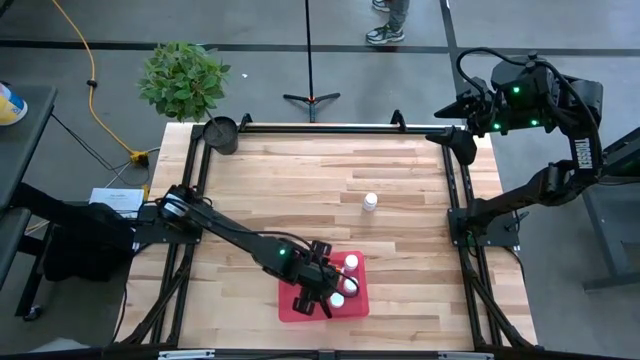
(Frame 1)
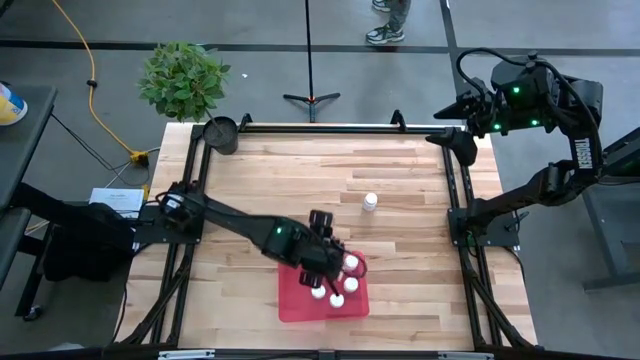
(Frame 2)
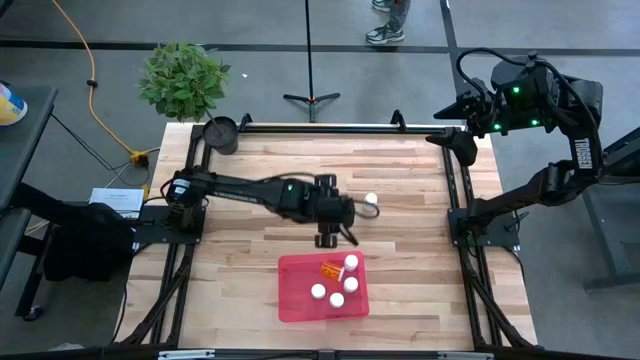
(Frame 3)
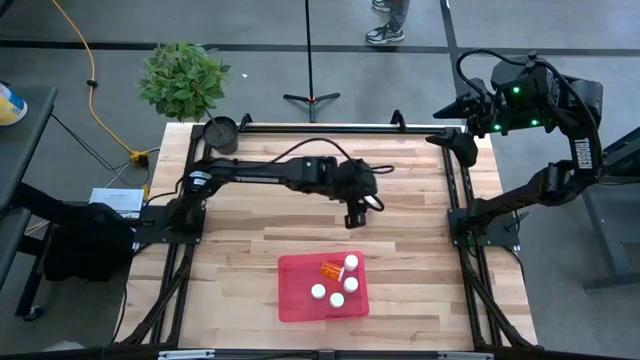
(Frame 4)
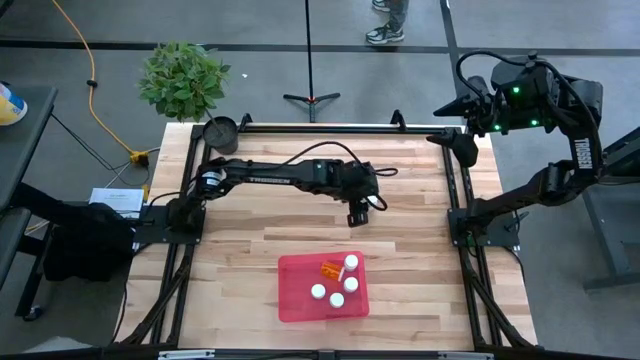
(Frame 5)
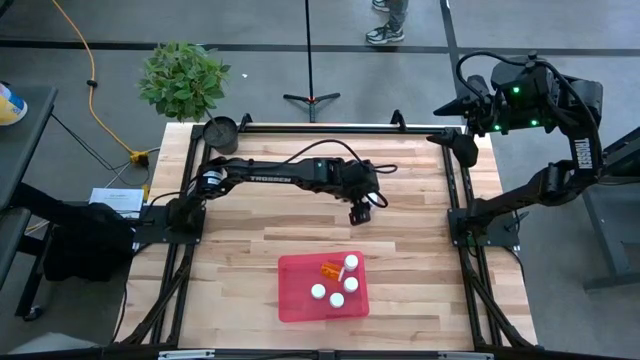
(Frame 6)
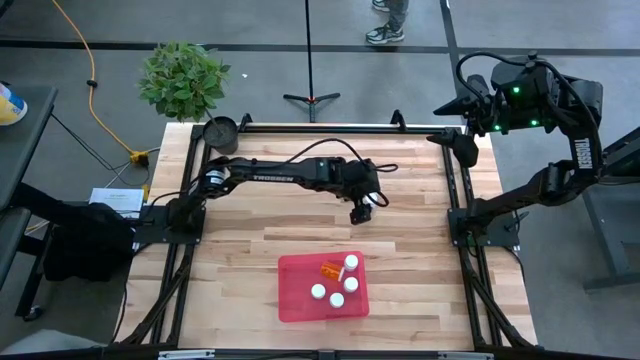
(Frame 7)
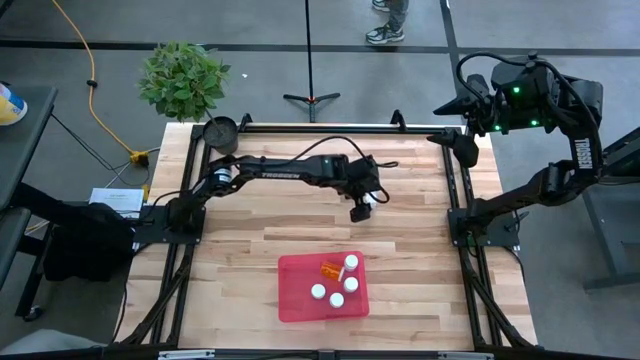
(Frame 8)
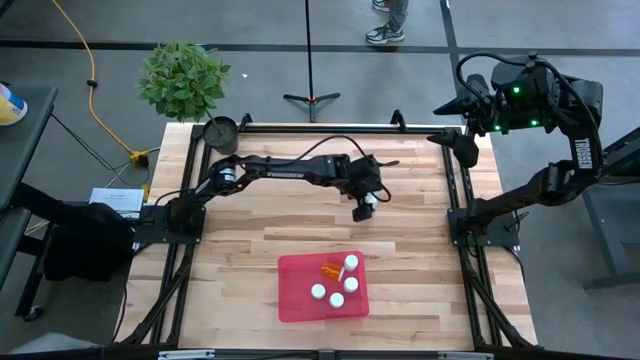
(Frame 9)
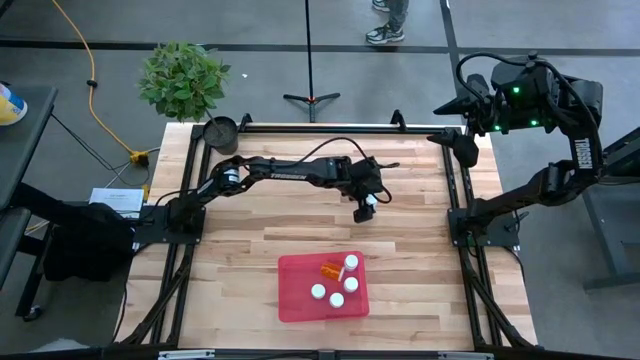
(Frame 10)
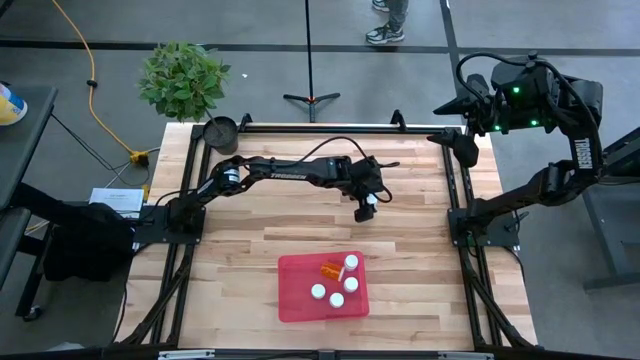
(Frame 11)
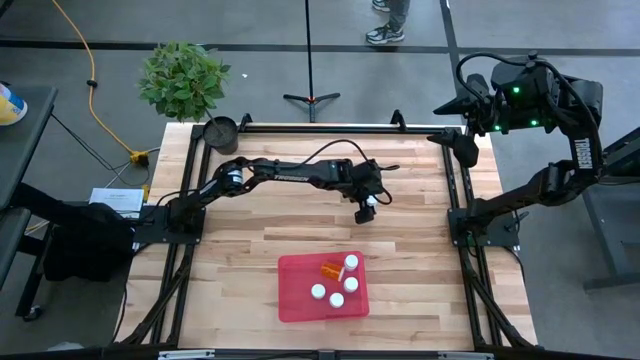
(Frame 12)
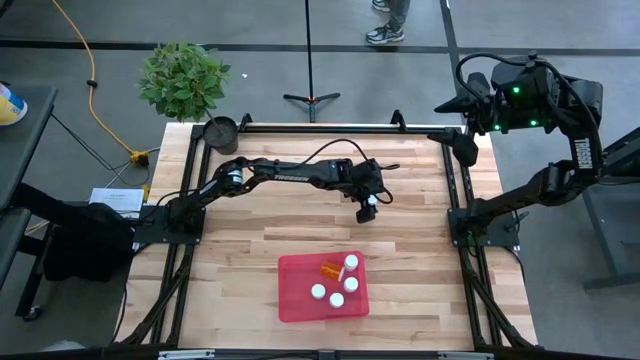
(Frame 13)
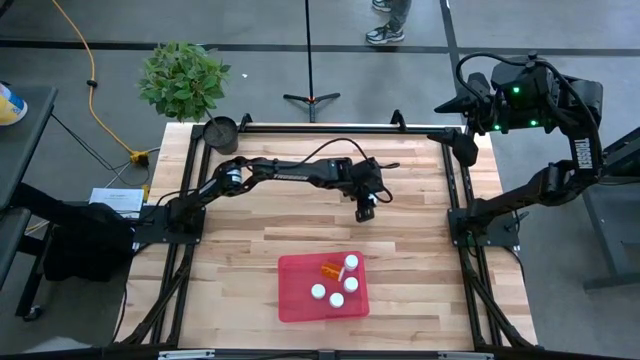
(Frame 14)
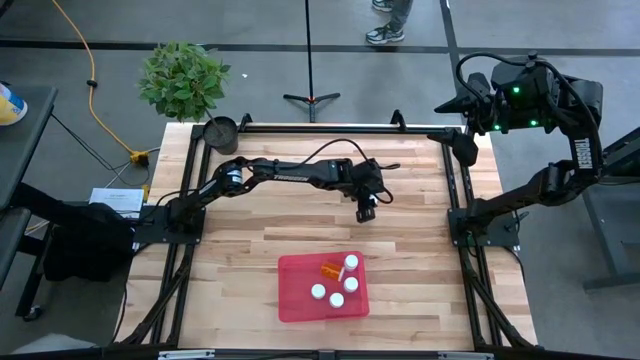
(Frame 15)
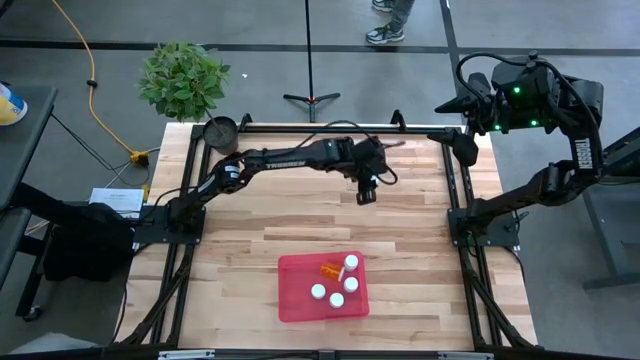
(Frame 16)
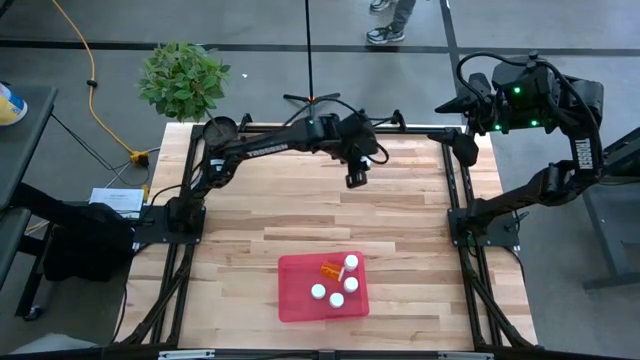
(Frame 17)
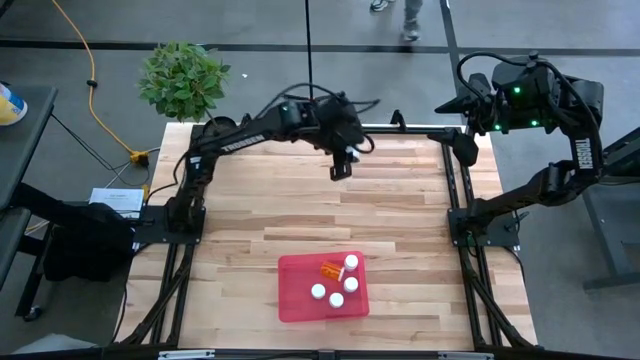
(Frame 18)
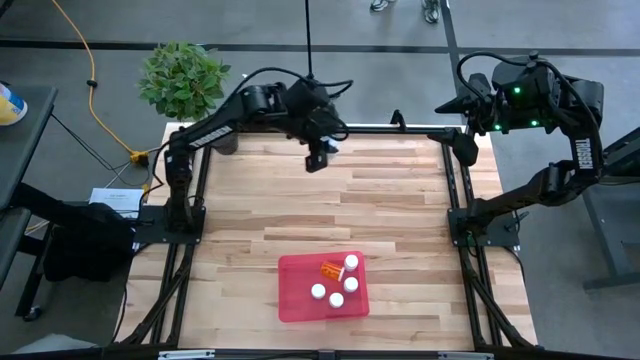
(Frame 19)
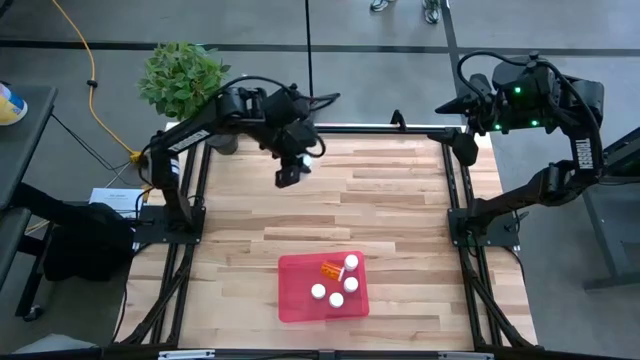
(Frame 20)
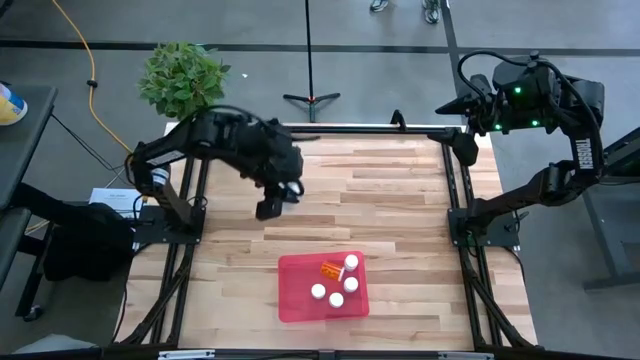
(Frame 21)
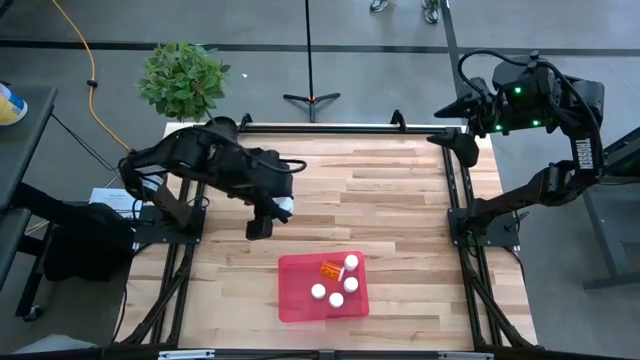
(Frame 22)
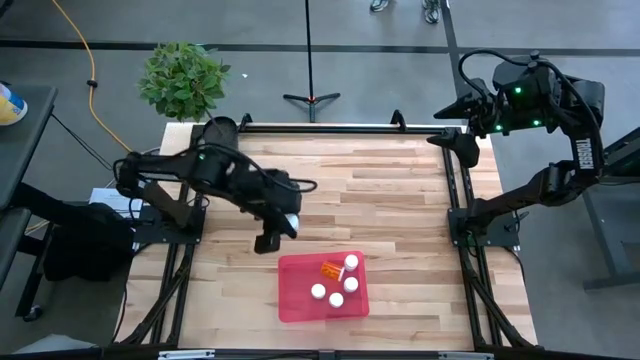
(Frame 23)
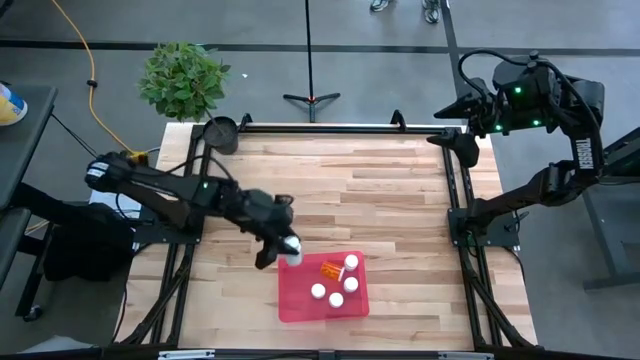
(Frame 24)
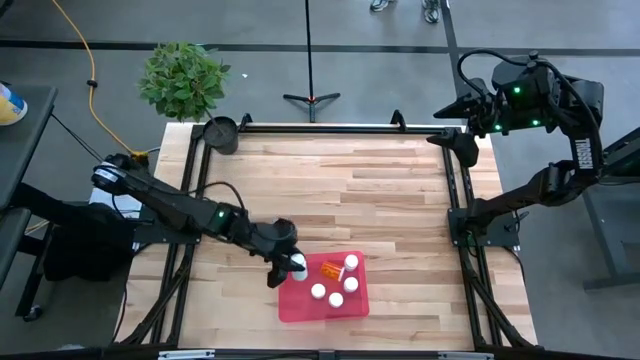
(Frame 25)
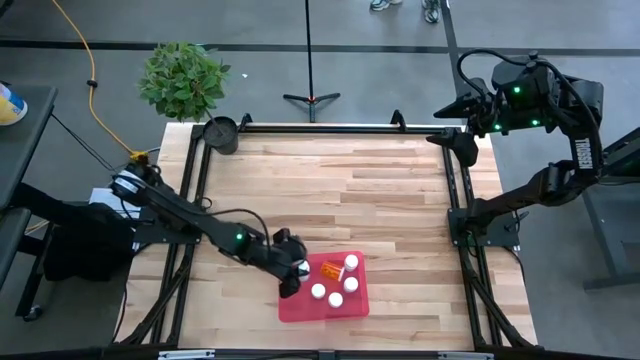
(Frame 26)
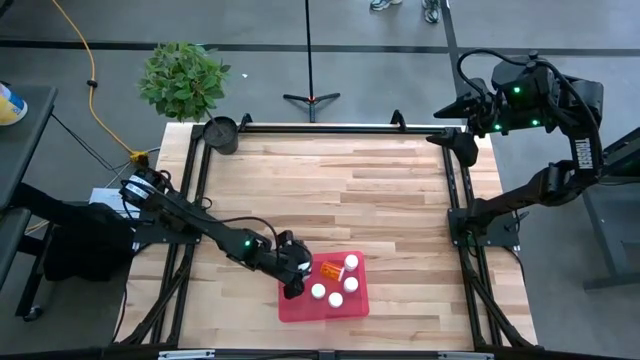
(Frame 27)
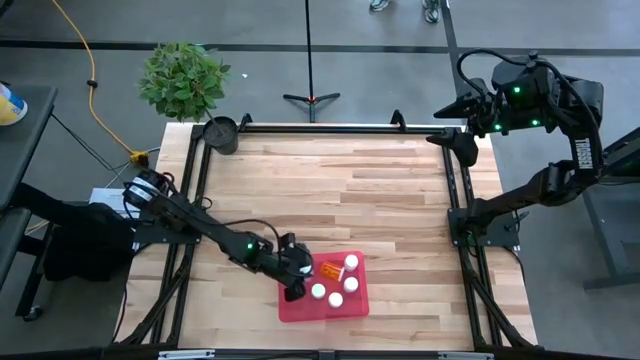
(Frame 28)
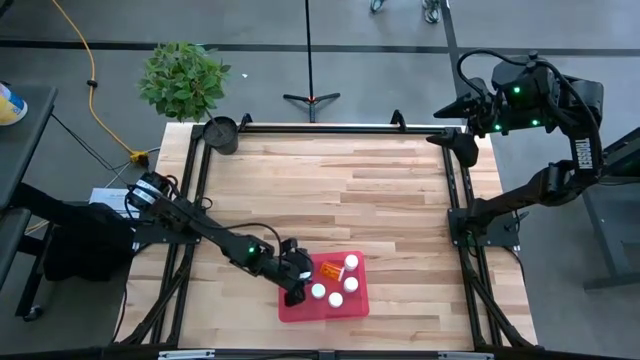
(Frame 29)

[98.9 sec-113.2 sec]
Task: Pick and place pill bottles into a basket
Put the white medicine bottle into the red container

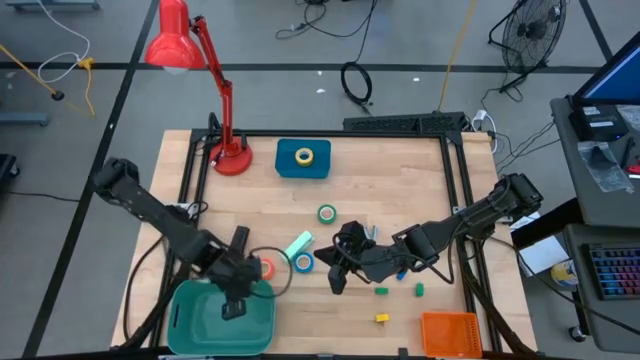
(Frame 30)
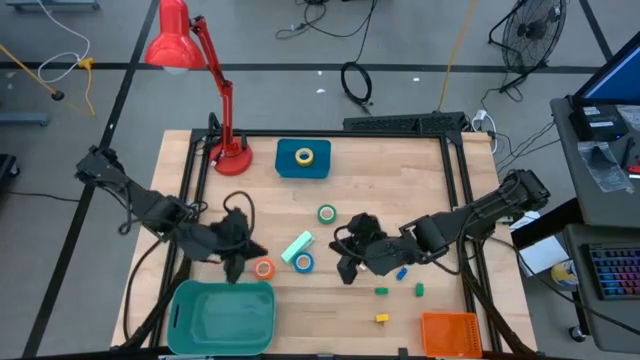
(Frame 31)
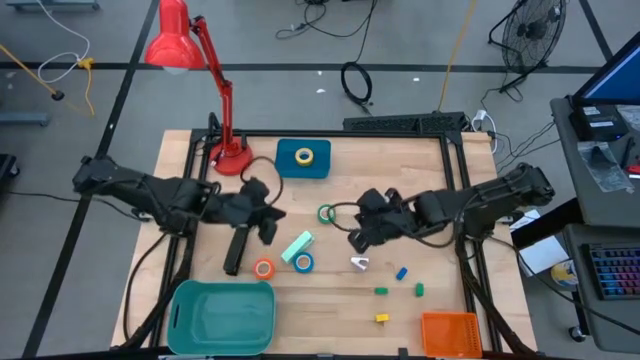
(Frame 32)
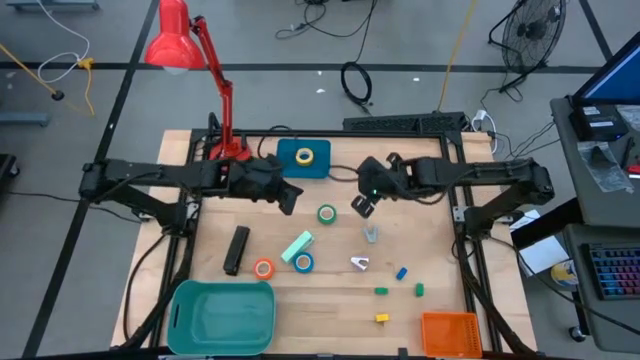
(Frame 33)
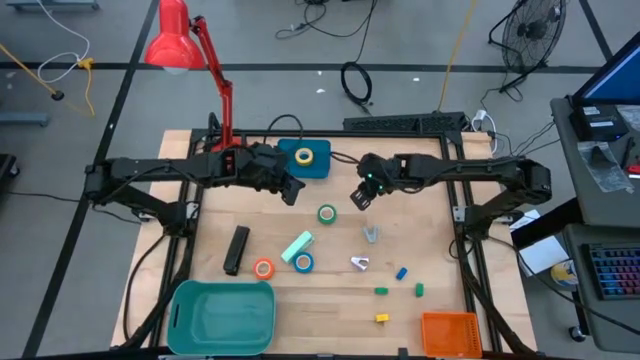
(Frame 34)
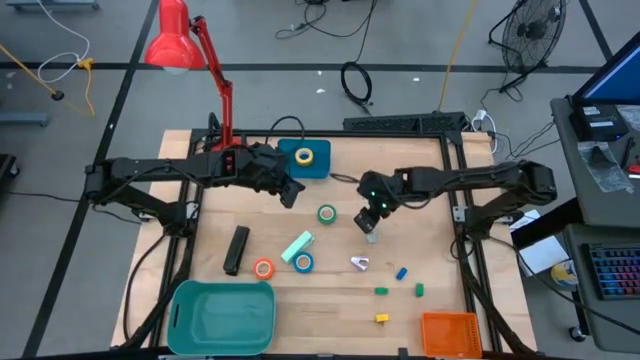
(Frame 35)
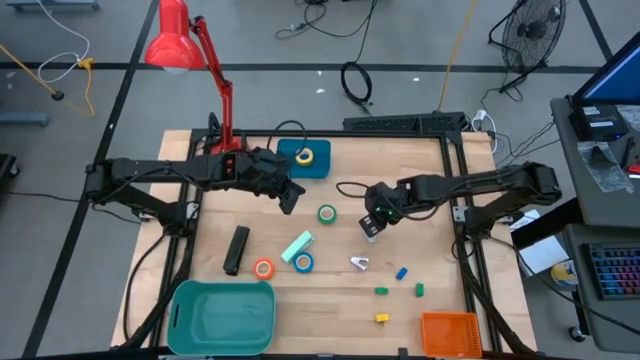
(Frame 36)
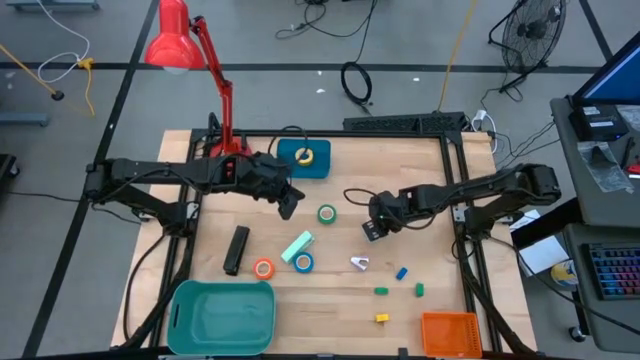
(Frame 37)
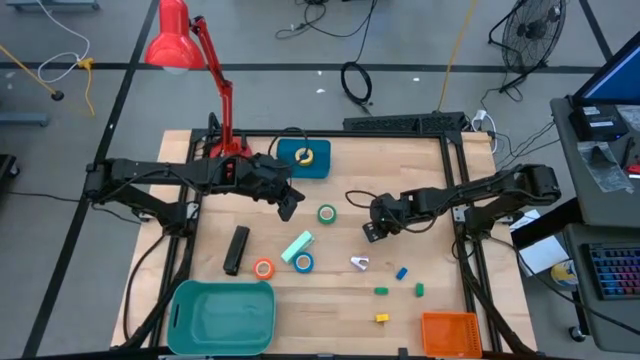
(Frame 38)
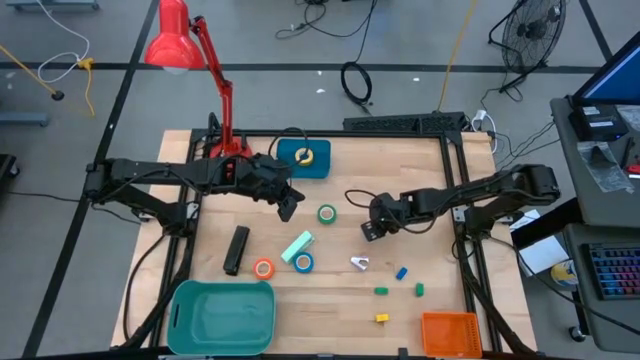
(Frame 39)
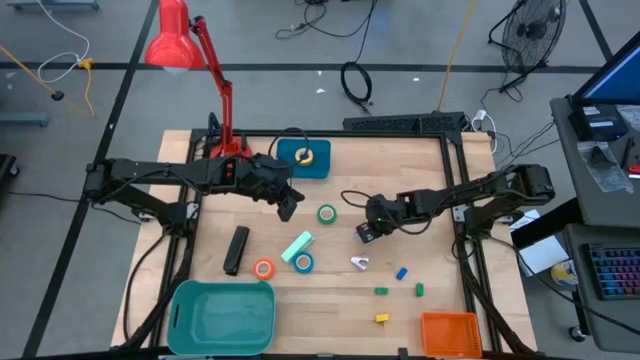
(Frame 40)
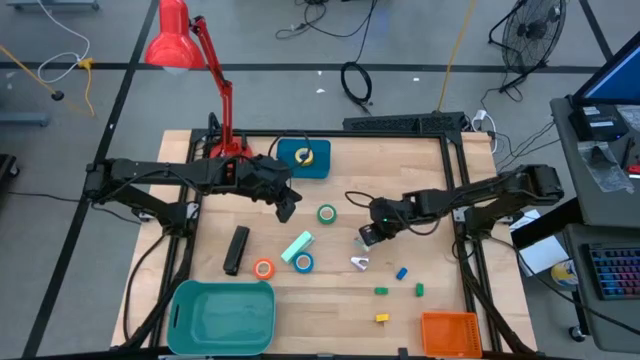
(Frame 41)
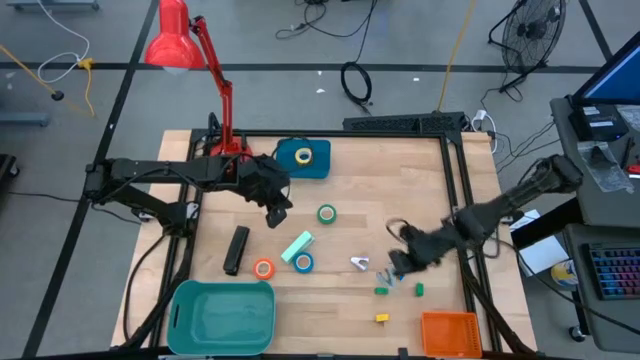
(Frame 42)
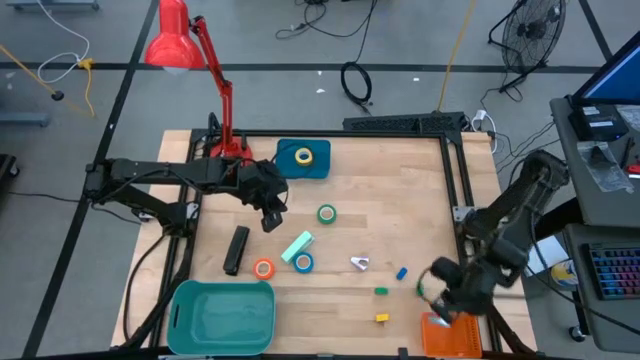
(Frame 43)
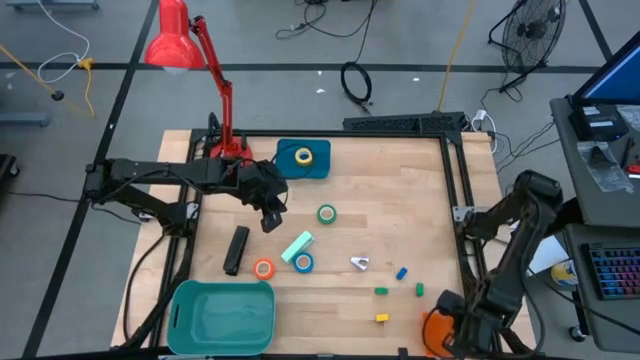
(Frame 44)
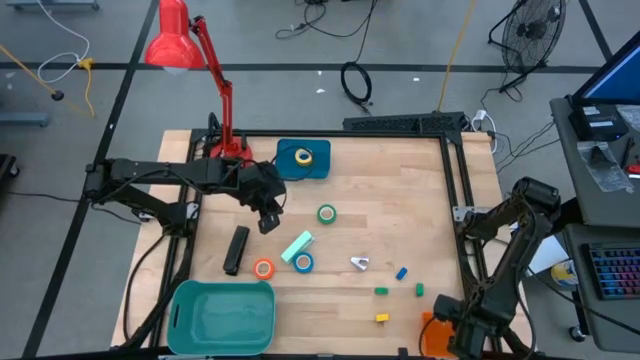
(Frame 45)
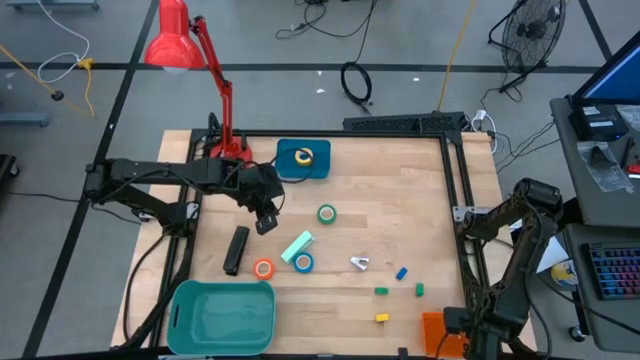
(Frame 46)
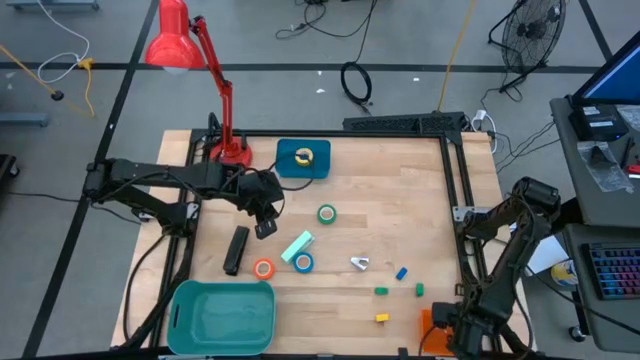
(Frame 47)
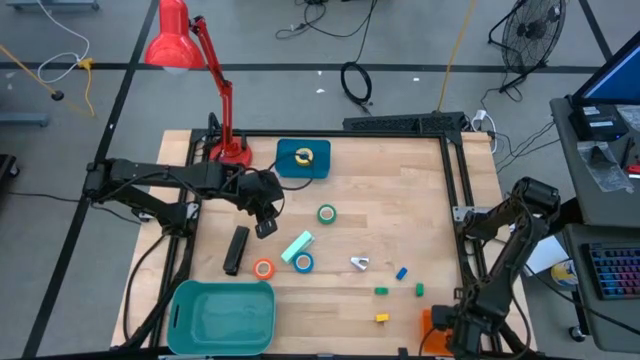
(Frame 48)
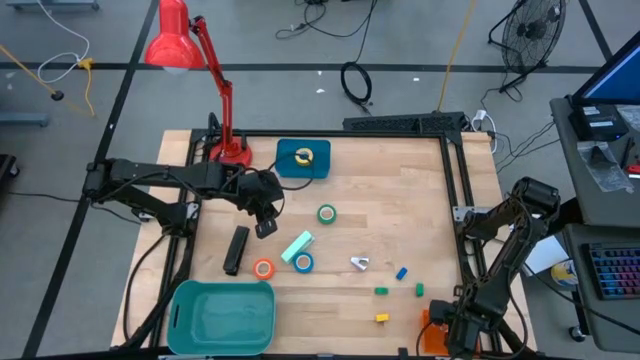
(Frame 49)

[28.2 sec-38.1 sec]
Task: Pick and place Stapler, Stapler remover, tape
Put the light blue staple remover into the orange bin
